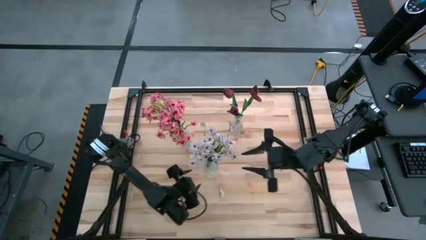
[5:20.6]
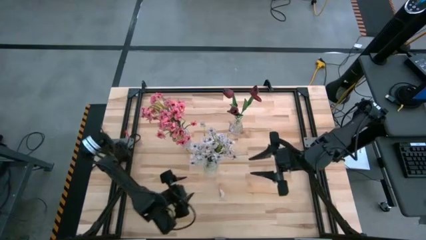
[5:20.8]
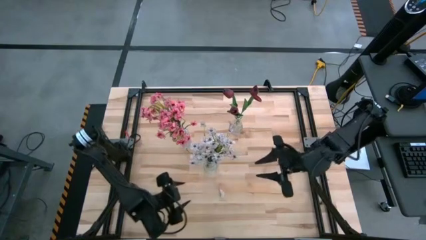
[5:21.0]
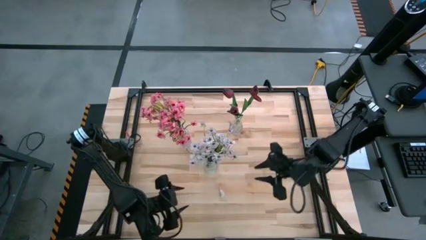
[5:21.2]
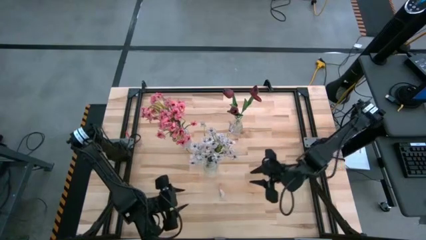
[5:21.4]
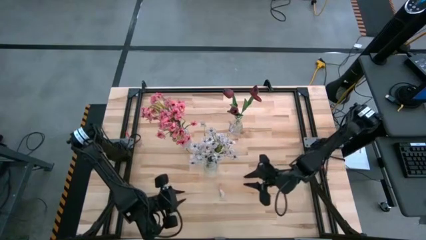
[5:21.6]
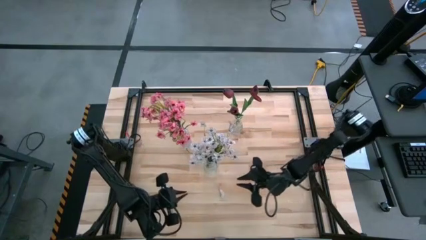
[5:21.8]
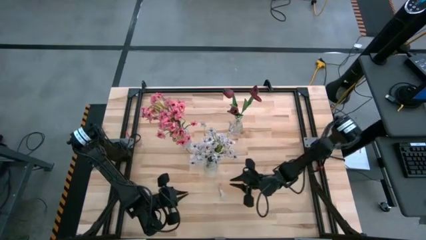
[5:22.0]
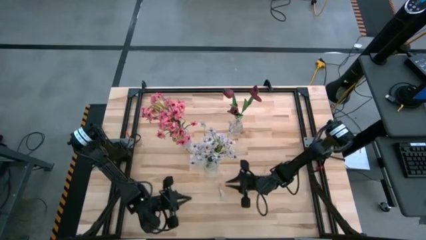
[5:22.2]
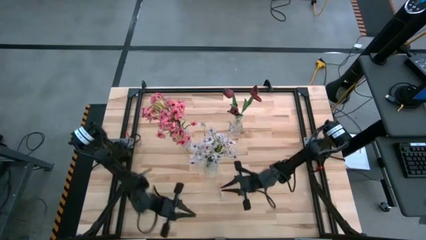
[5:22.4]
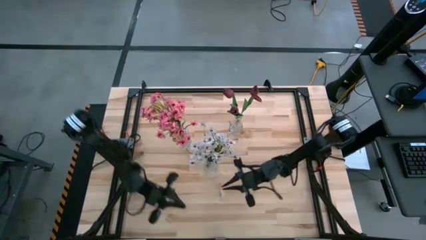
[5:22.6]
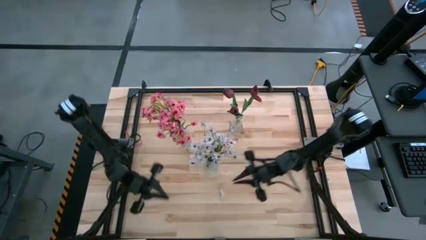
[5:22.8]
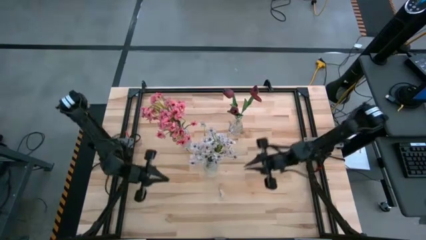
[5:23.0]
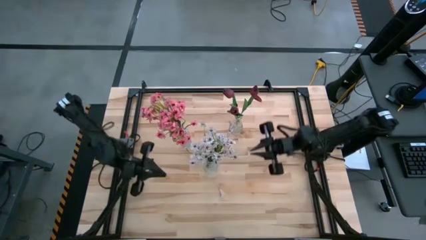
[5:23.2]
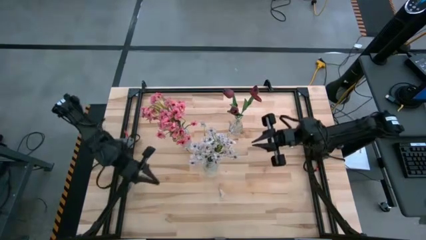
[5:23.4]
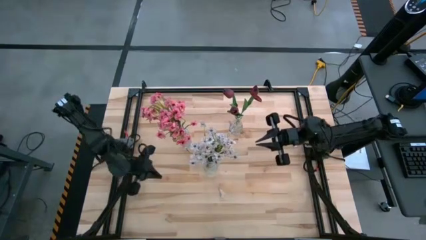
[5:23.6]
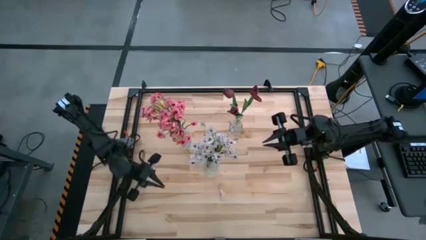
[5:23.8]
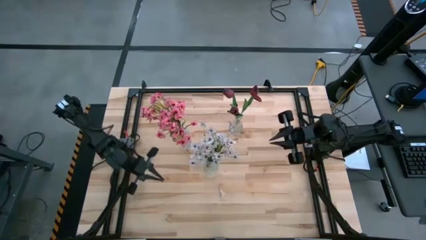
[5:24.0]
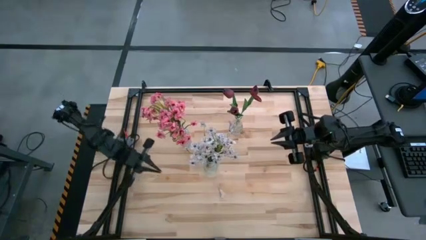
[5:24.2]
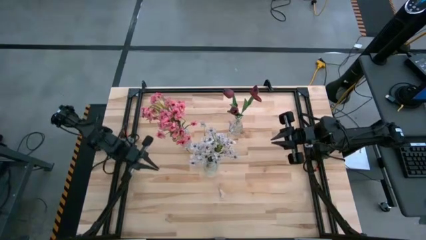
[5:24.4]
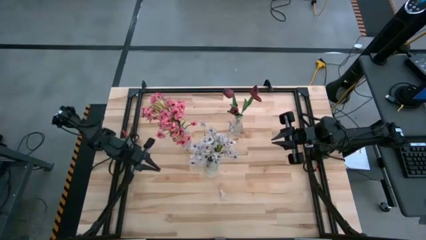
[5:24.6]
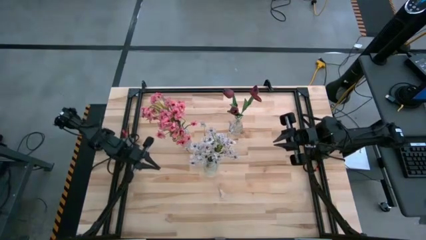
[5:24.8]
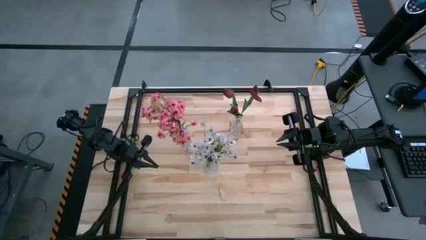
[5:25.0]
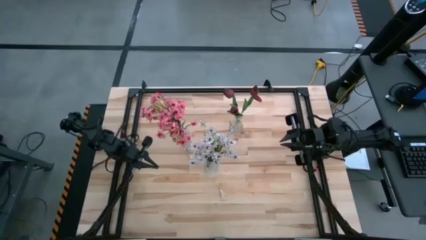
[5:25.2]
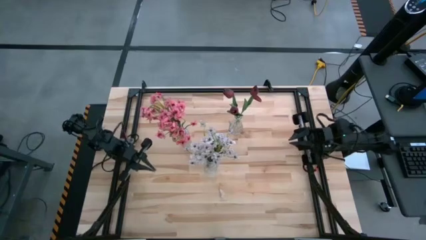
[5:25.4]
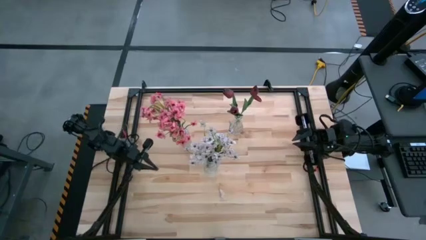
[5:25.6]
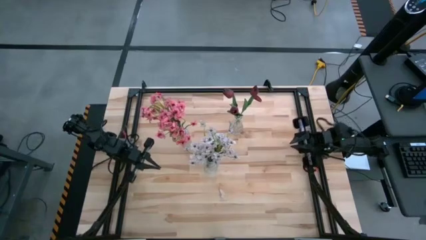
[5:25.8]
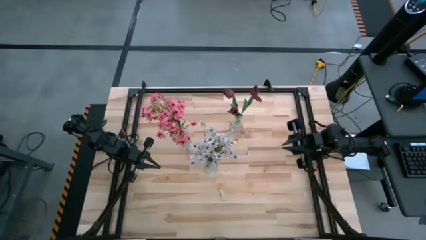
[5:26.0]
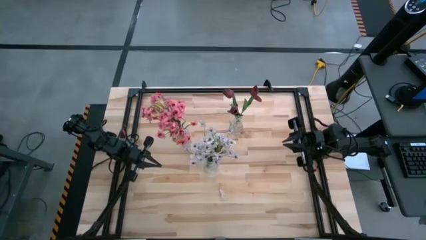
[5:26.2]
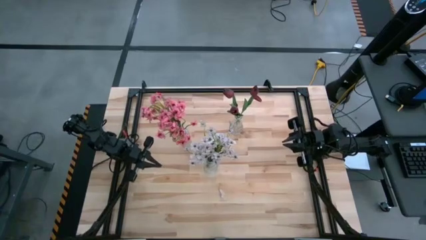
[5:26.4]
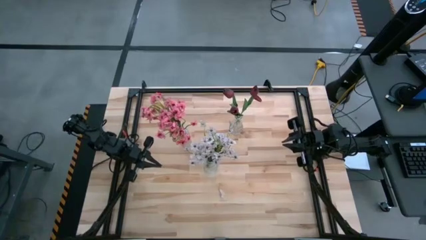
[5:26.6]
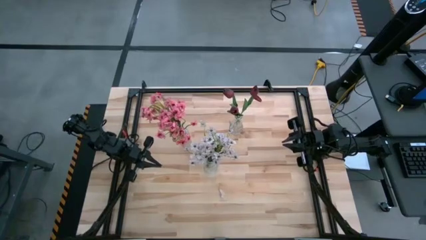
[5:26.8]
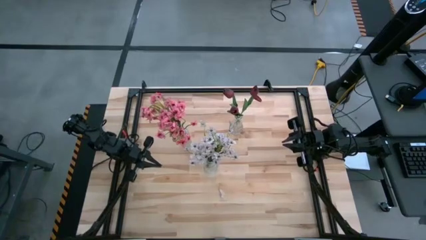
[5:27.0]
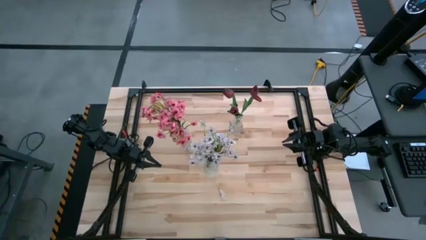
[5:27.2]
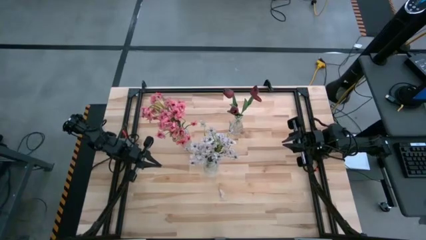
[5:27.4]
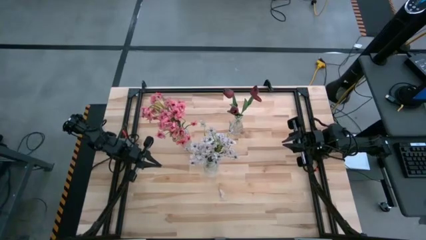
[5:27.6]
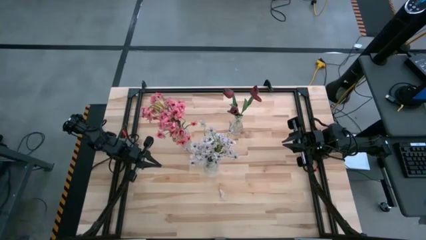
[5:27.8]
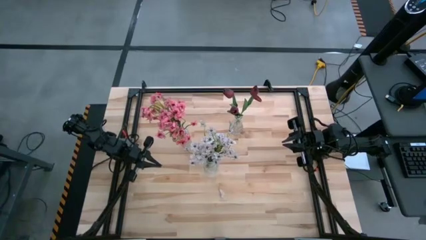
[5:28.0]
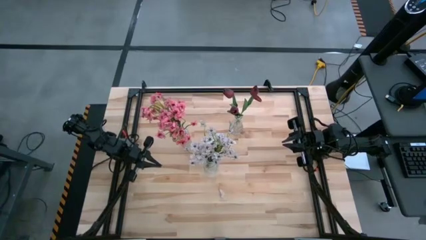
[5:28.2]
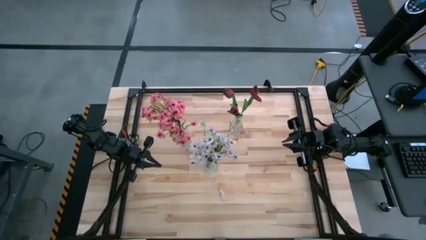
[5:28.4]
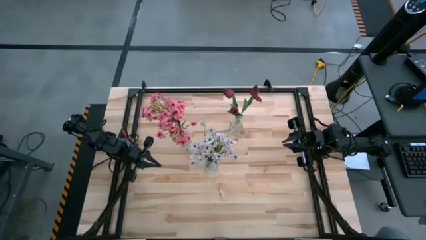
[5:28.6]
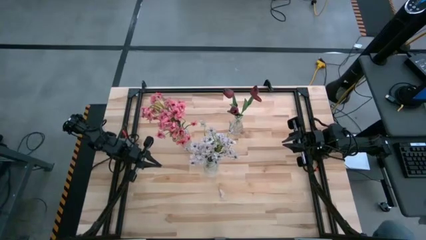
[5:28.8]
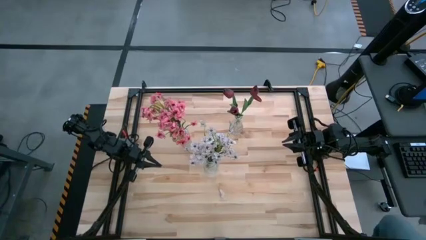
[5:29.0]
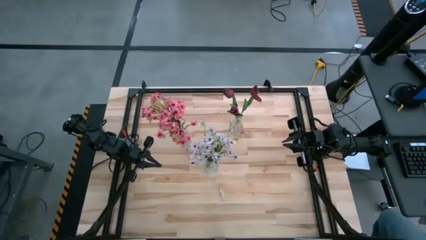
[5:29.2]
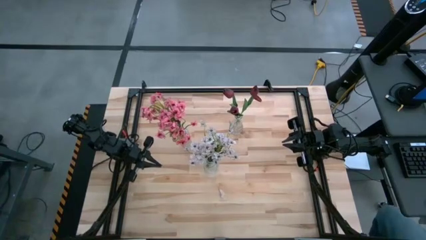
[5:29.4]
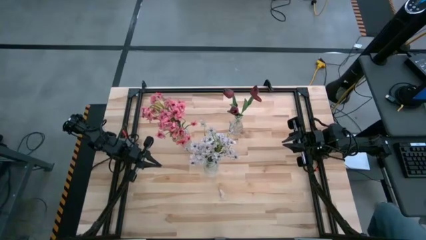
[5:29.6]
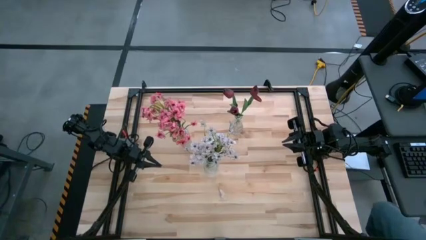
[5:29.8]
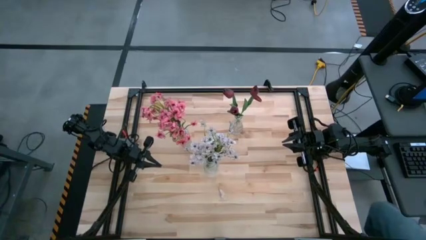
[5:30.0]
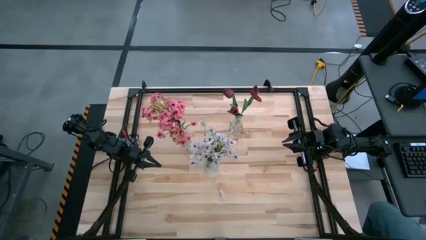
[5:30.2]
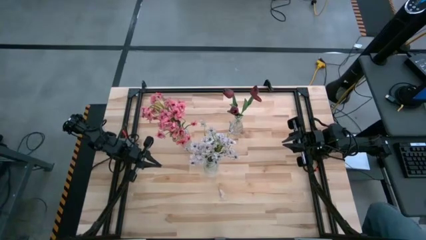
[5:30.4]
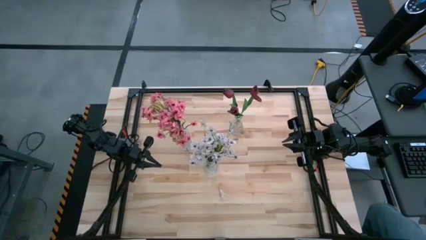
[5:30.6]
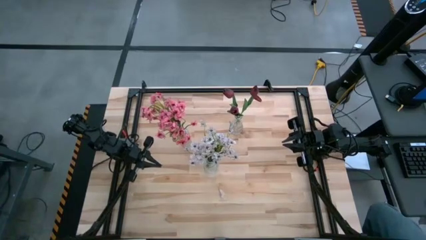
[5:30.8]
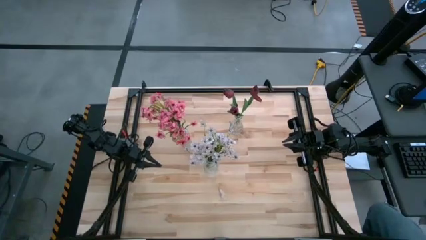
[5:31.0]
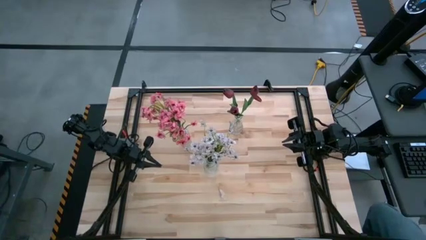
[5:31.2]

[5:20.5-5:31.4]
Task: Sort flowers into vase by color
Return to Home Position

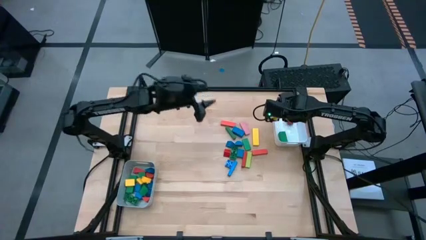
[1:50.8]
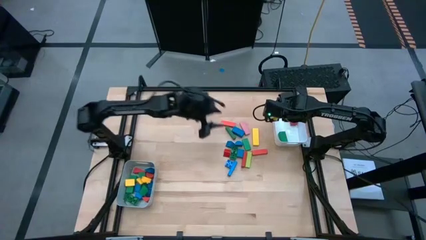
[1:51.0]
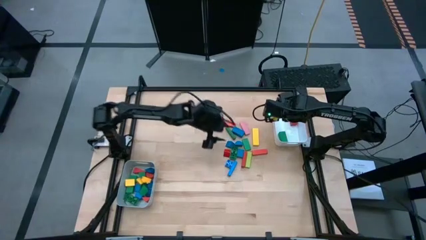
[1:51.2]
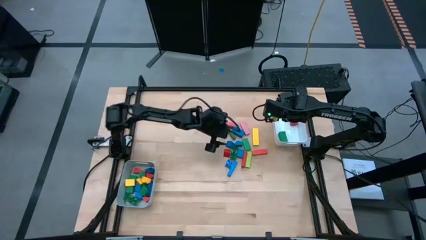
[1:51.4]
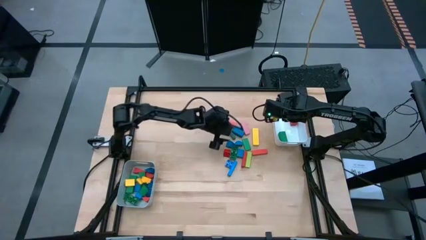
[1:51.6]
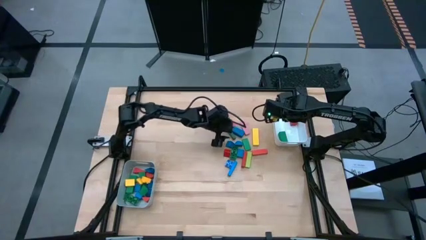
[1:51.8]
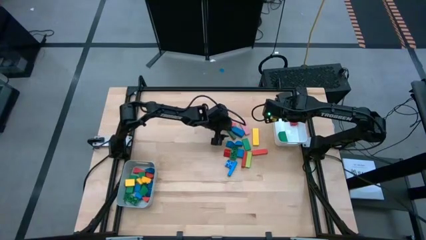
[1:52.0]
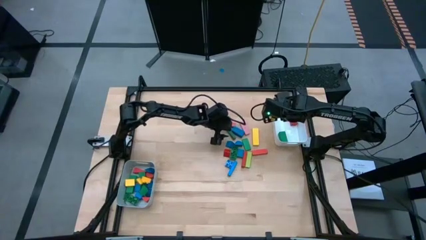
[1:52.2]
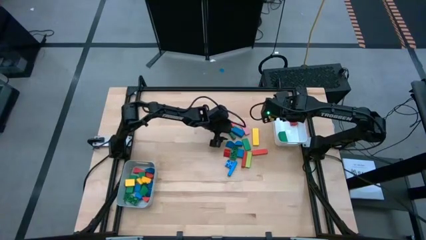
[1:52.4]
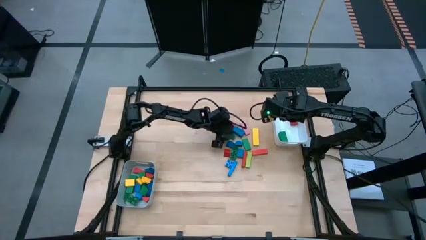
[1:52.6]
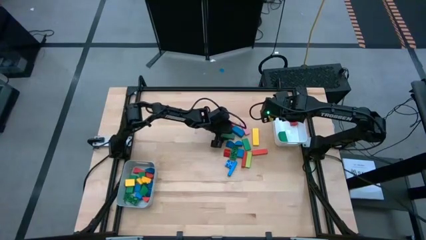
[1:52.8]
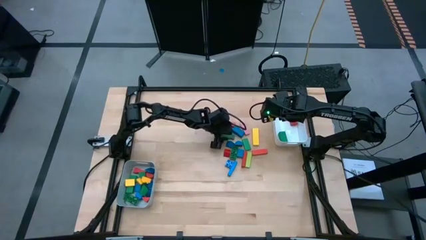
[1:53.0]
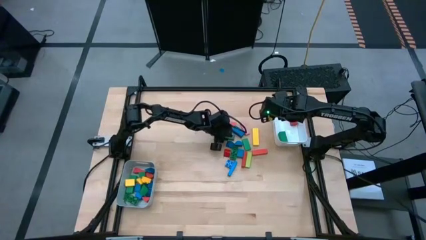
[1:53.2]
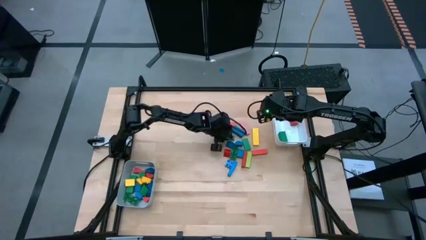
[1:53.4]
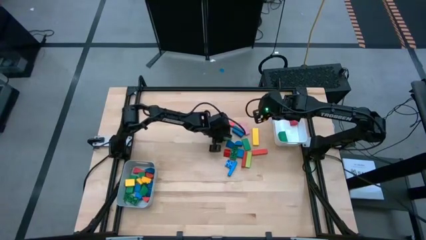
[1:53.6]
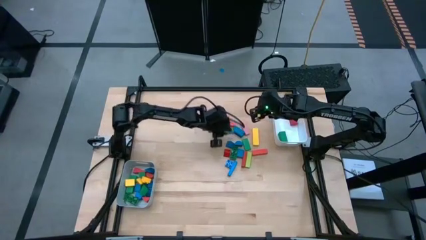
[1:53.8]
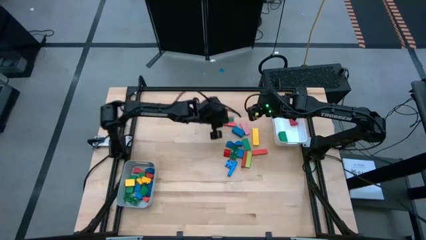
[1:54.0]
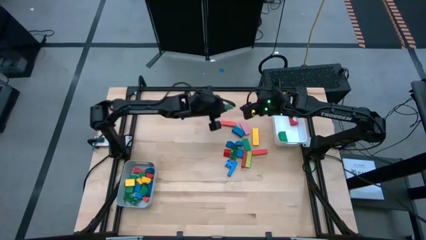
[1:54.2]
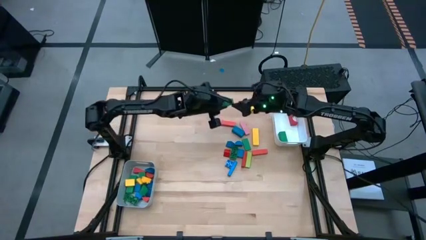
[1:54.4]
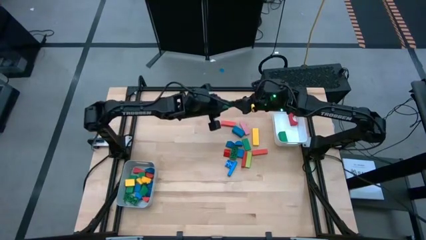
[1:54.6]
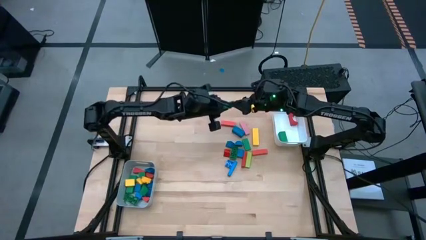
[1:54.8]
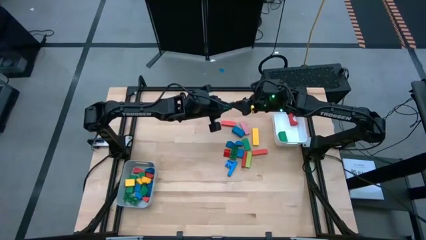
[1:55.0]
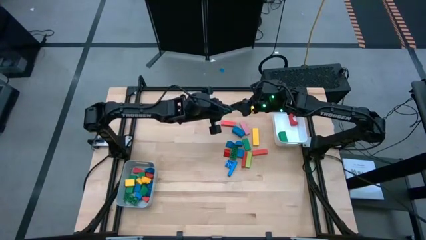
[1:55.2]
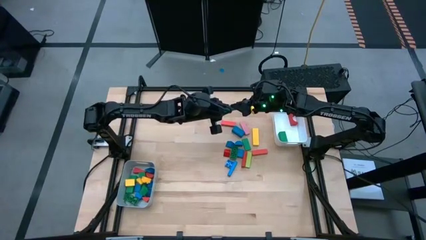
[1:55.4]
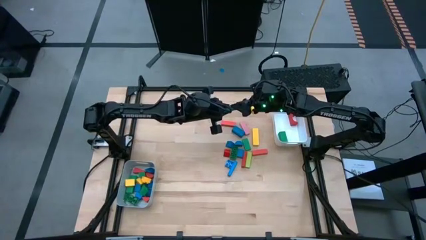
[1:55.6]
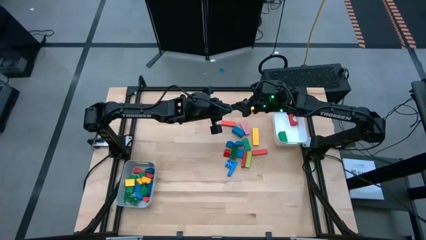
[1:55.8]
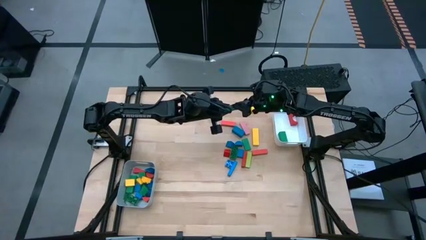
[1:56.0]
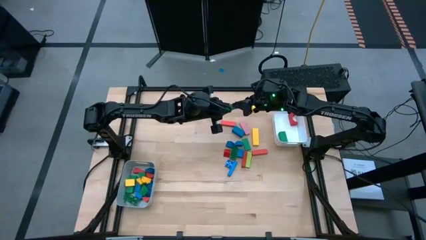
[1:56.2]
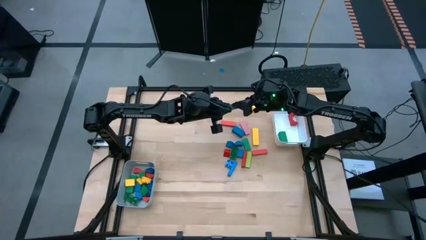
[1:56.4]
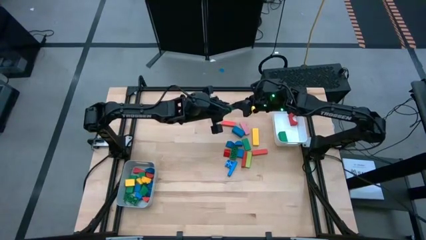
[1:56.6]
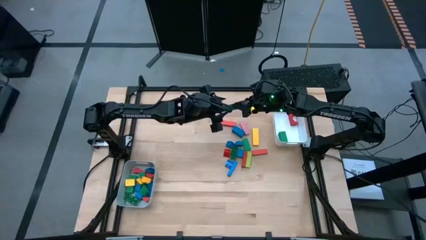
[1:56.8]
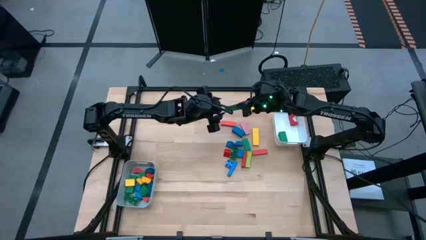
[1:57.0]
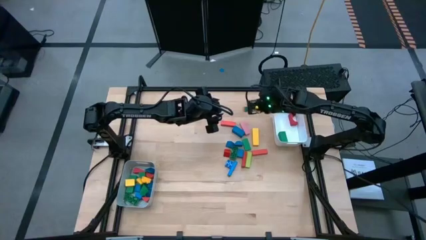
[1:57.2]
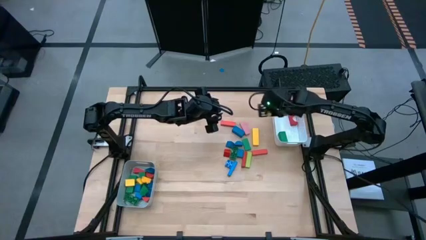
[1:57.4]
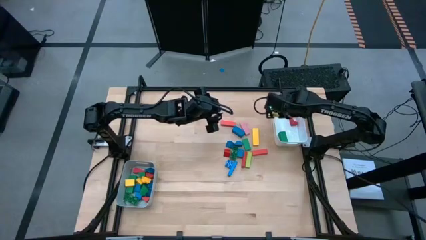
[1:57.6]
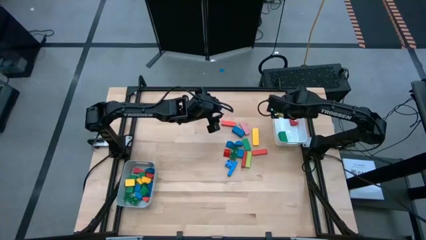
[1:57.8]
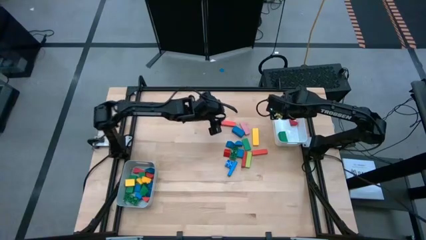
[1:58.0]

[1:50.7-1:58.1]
Task: Sort blocks by size
Put the green block into the white bin
